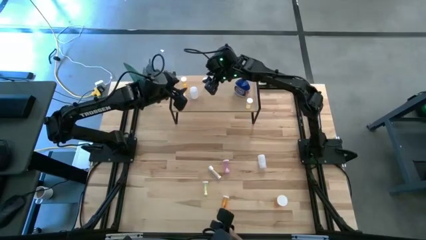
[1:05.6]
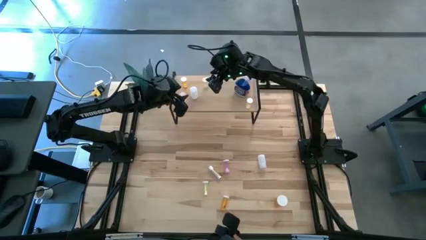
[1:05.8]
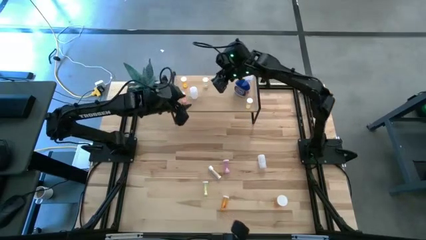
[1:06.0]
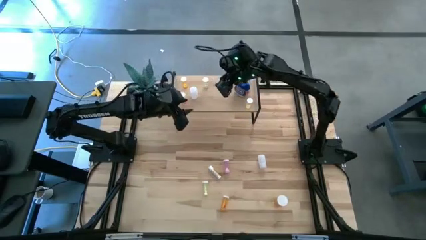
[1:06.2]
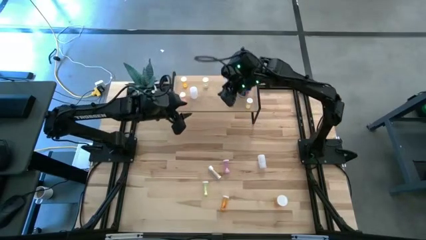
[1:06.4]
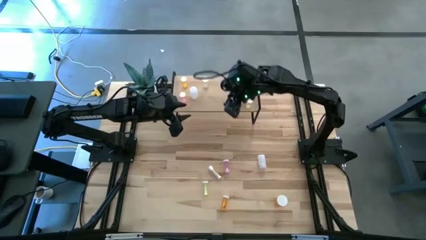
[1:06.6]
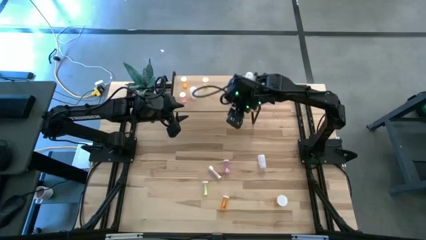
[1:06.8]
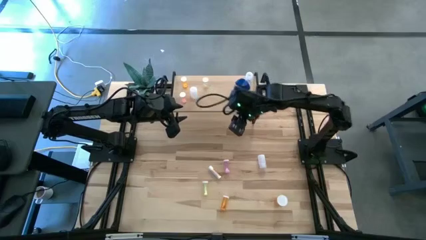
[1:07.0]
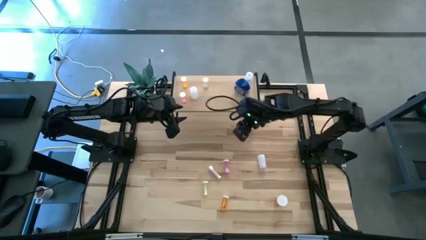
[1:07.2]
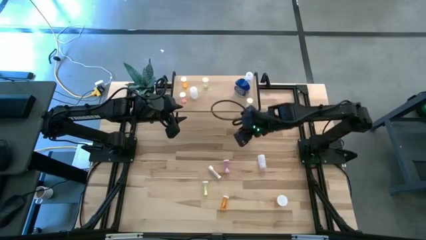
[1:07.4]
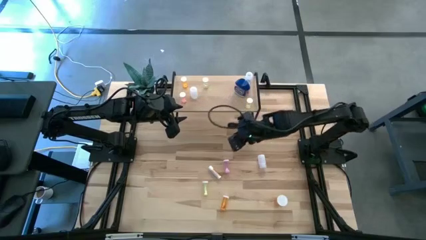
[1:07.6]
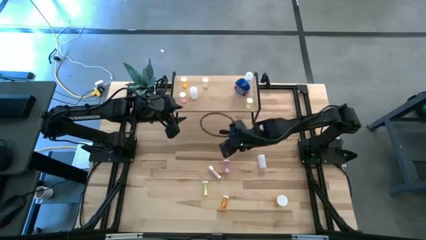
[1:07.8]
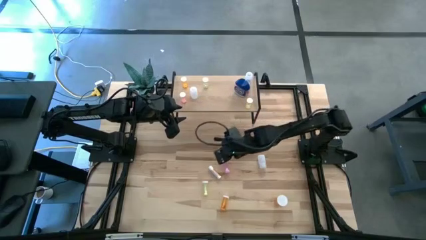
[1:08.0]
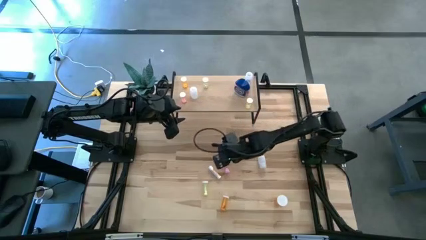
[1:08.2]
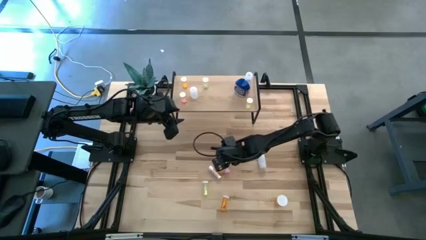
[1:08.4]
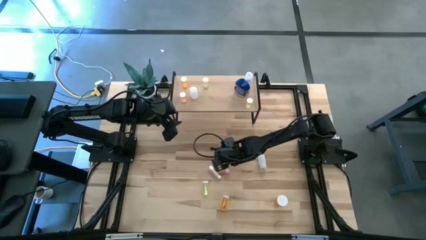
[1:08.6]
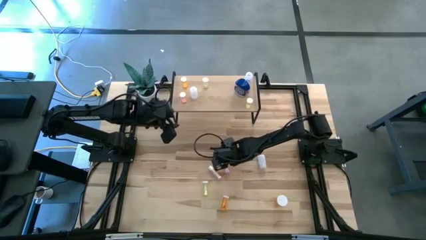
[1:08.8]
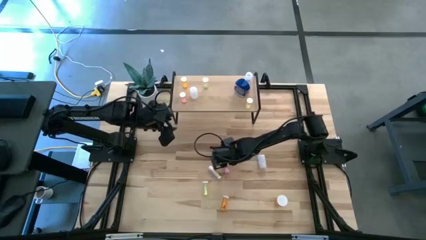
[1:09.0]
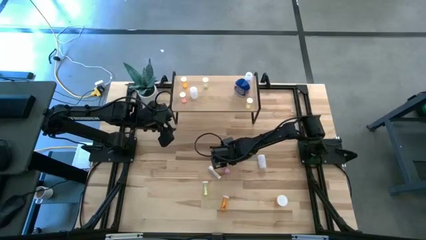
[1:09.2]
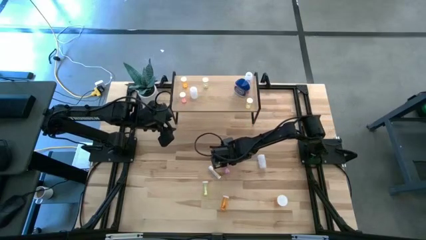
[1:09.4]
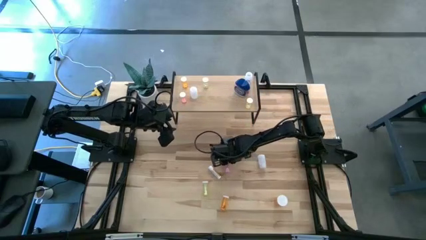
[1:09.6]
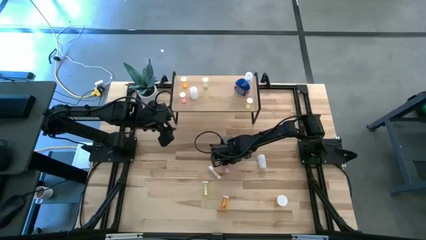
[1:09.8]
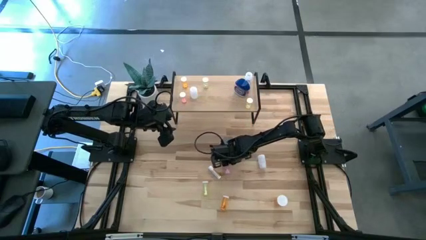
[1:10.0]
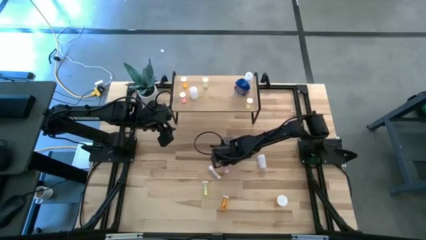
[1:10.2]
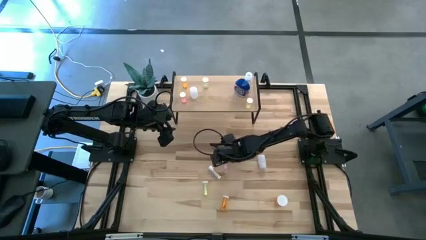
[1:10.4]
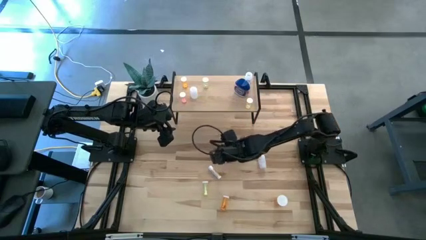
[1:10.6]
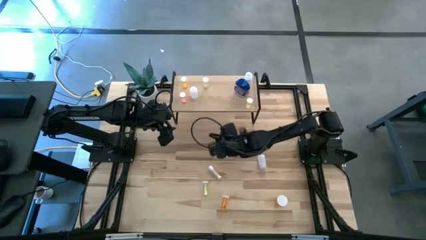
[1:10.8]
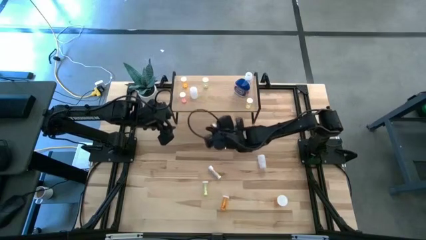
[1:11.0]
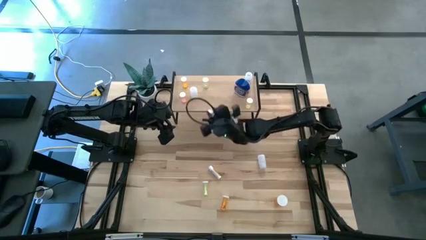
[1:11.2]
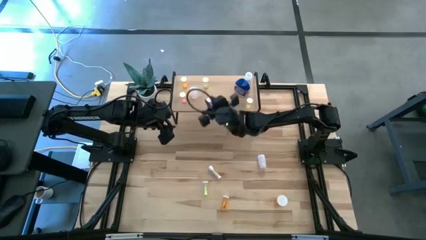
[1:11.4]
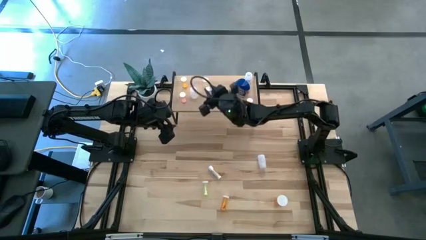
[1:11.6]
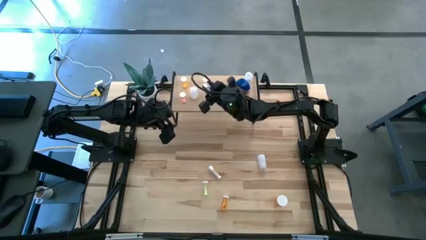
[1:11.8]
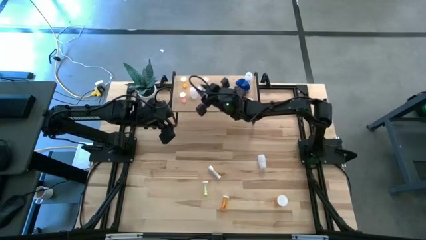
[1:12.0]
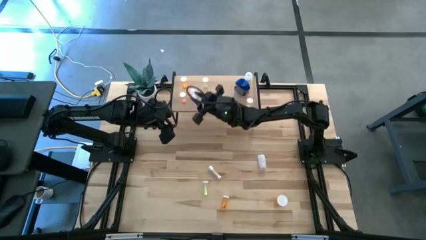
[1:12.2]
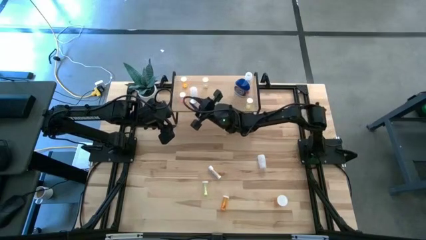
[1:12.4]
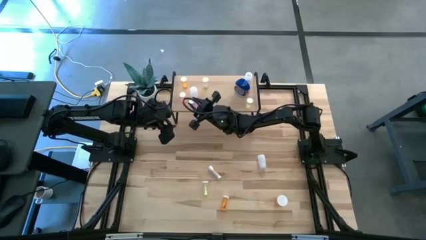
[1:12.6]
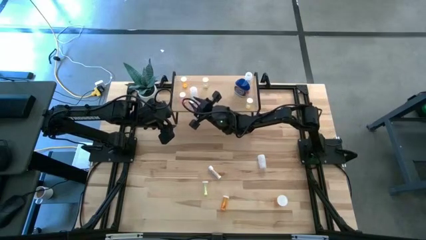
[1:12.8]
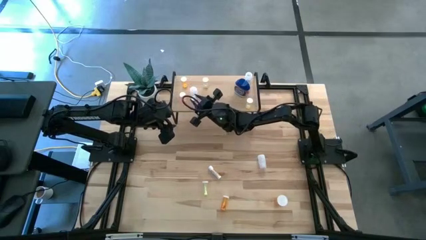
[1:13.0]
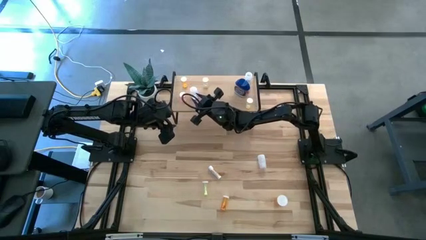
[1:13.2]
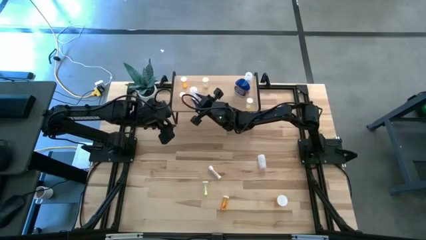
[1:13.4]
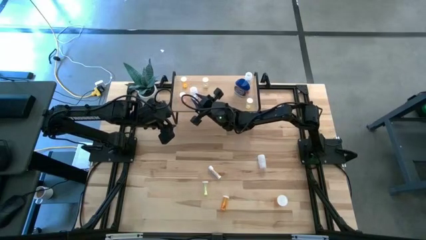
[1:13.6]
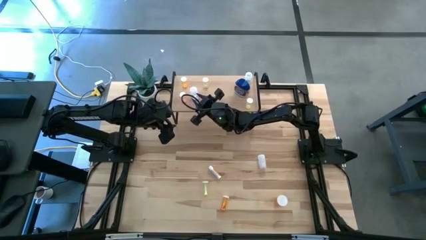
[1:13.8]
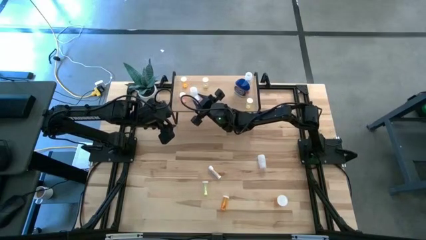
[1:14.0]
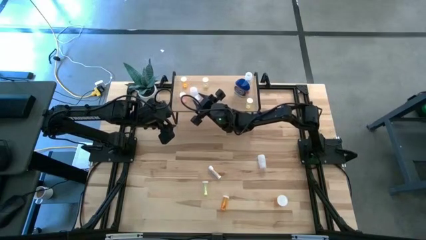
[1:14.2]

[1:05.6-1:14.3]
Task: Pick and place medicine bottles onto shelf by color
Put the pink pill bottle on the shelf

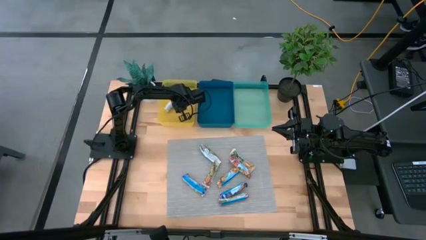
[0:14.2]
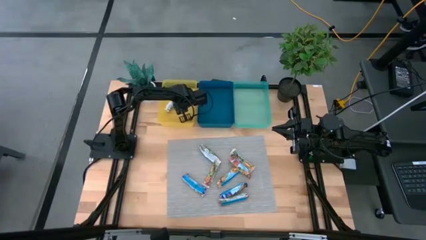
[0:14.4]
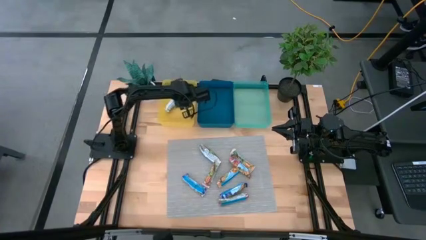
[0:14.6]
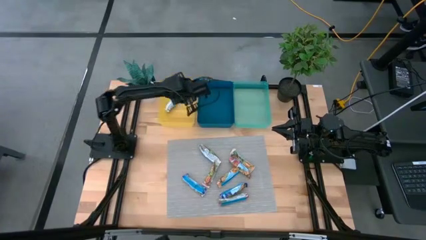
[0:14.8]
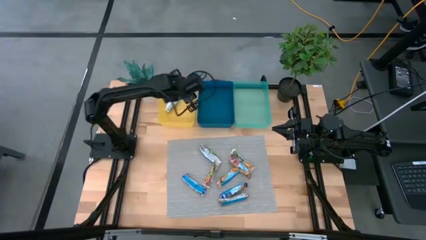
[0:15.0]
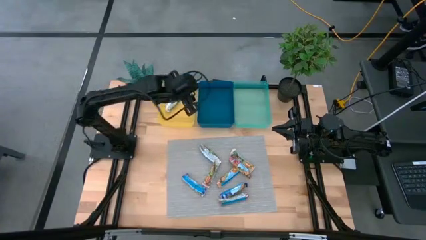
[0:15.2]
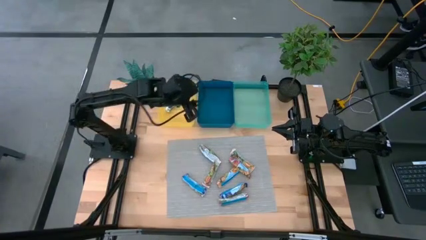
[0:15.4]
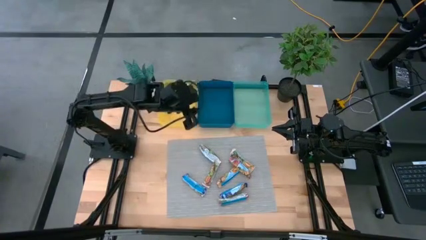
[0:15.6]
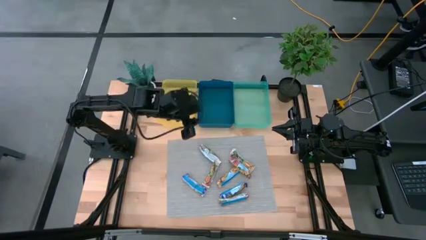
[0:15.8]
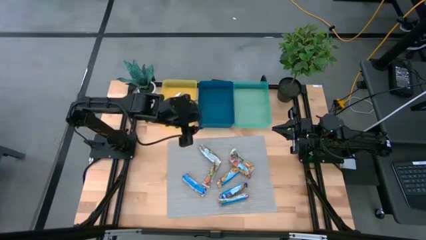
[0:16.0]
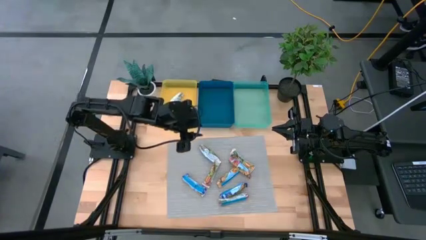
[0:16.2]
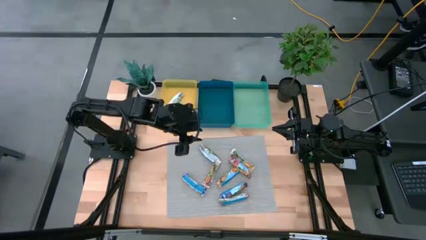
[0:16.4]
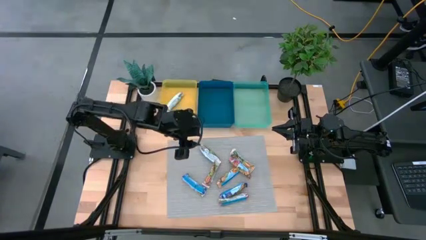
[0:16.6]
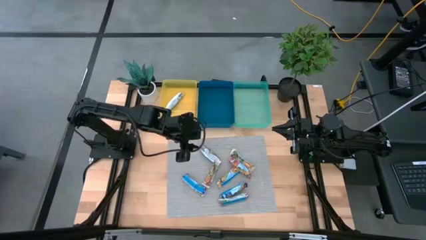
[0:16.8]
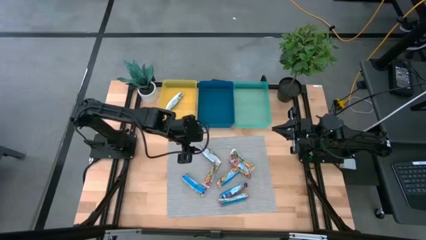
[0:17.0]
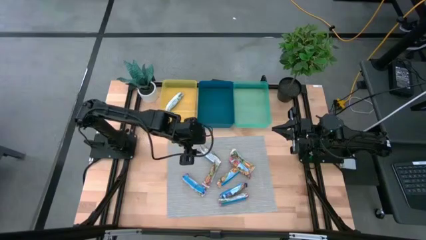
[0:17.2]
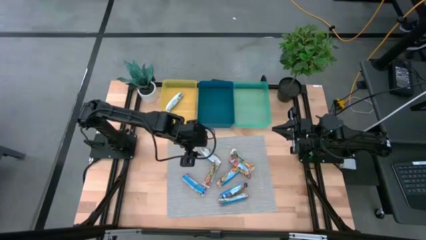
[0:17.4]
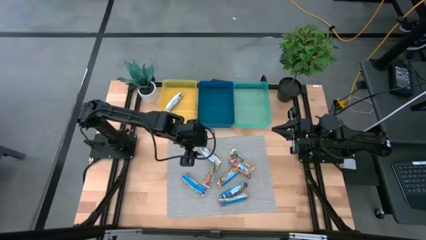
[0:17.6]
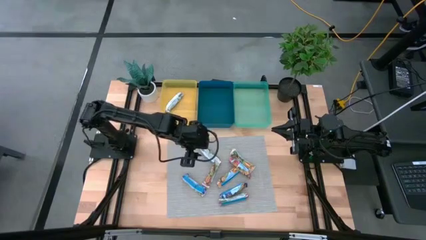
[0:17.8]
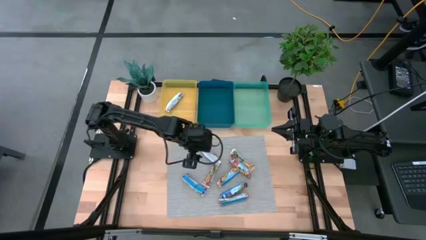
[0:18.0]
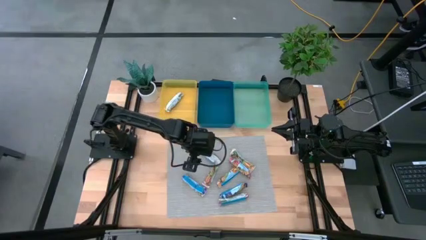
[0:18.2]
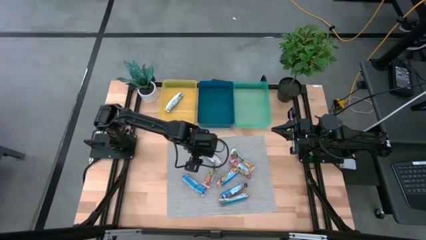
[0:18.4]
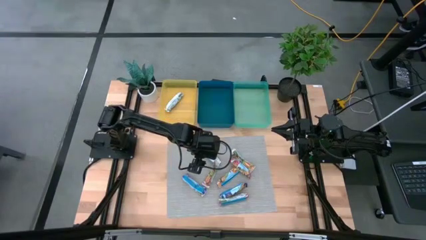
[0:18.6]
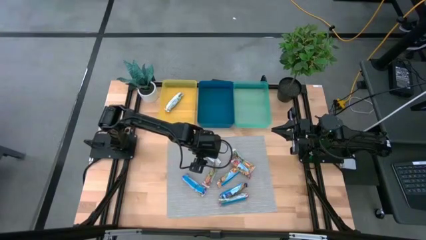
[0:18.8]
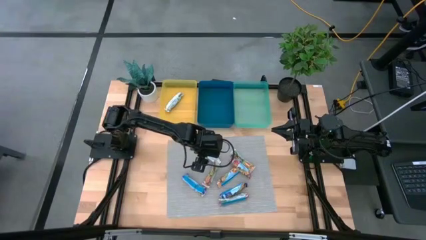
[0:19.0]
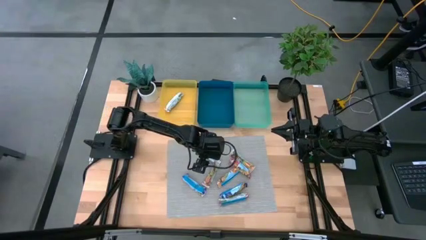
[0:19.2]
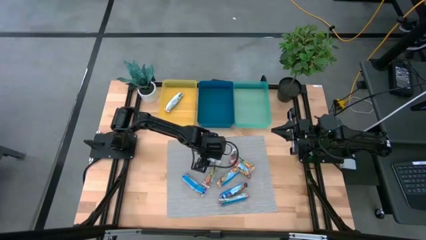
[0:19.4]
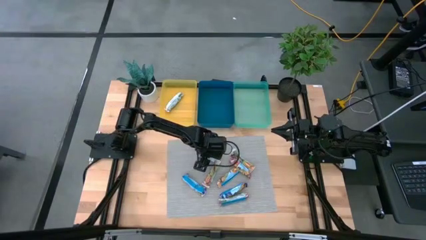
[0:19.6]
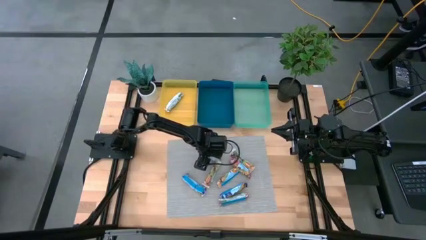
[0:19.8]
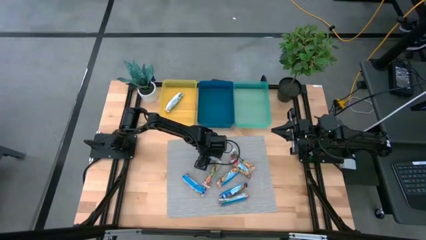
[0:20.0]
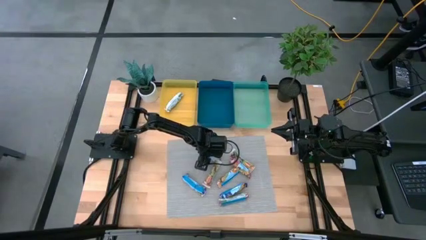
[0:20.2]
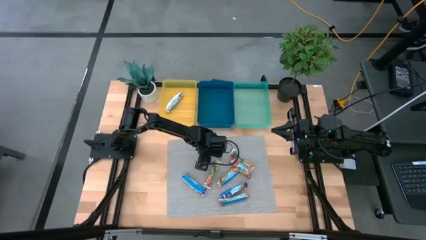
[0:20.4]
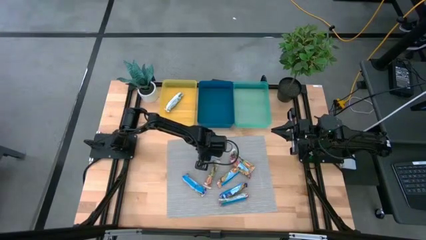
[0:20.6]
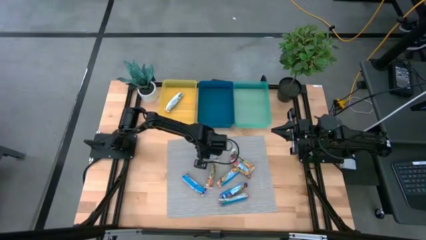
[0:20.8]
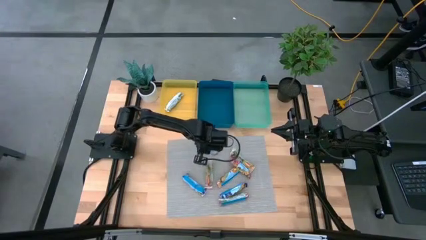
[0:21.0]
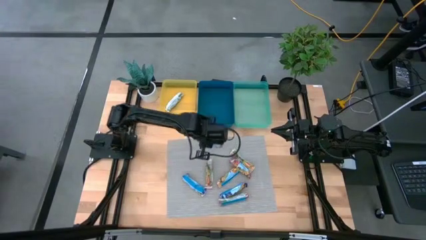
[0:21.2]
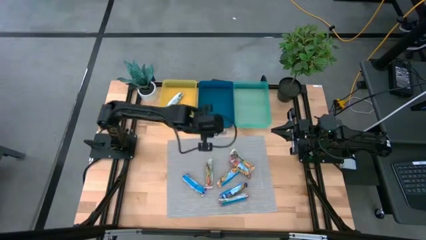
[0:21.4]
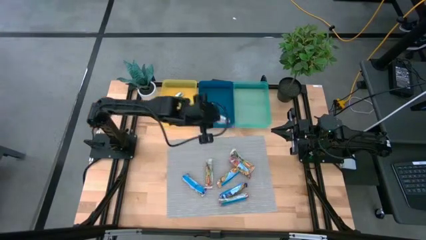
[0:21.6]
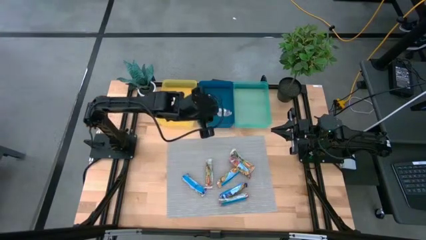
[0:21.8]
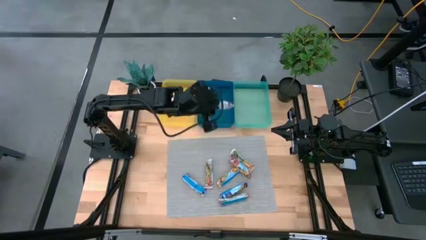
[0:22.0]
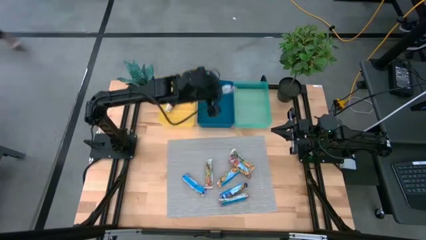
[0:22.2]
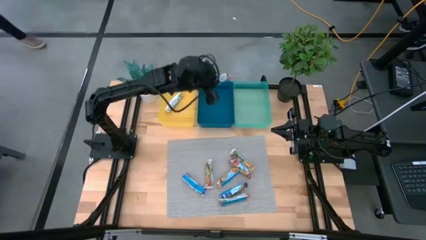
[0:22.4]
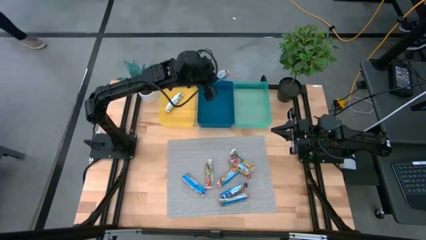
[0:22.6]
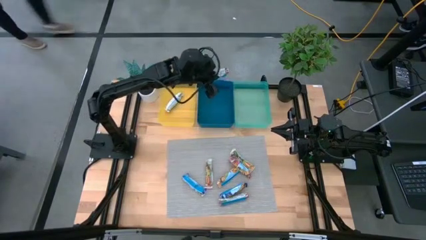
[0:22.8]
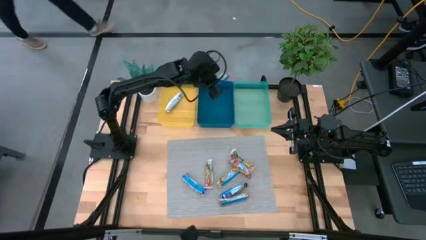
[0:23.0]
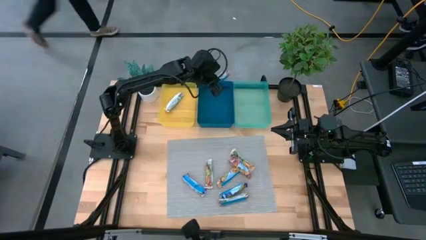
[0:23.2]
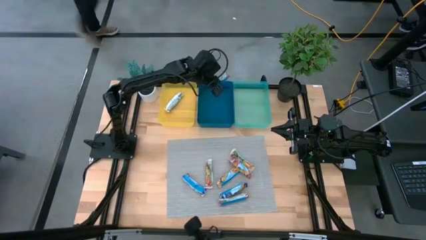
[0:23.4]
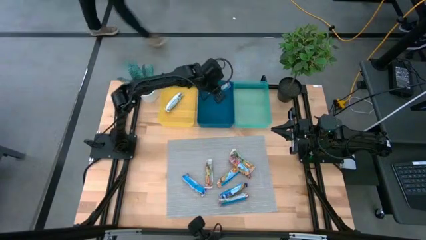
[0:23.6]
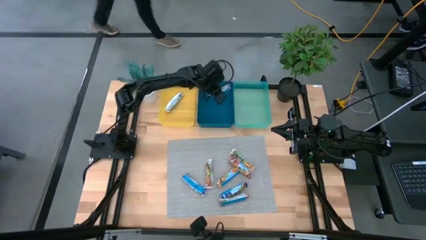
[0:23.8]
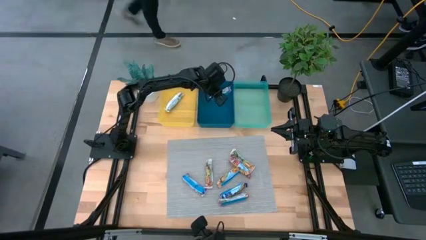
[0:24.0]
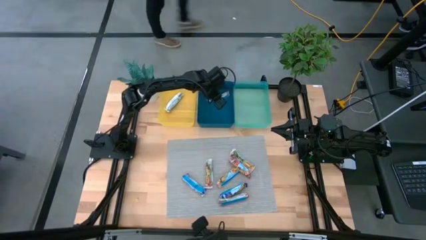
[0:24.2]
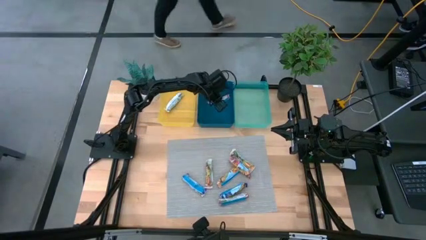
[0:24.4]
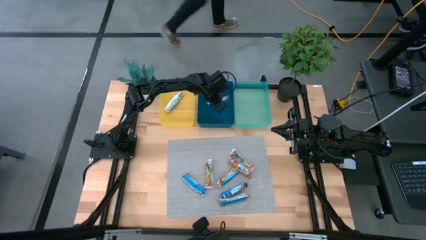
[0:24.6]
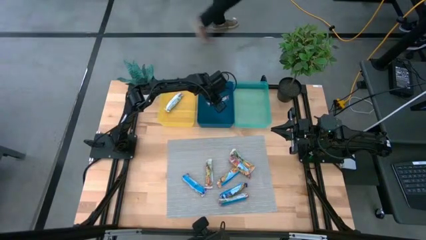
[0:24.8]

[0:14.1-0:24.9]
Task: Pick and place Granola Bars by type
Put the red granola bar into the blue bin
